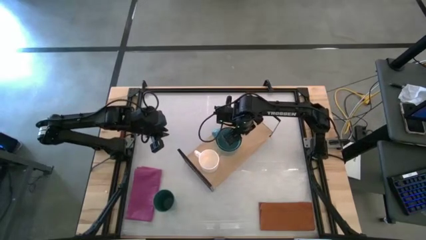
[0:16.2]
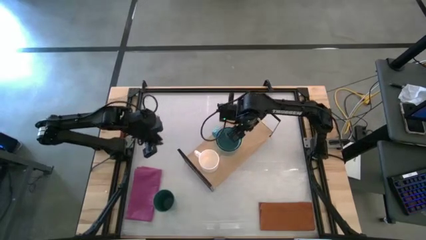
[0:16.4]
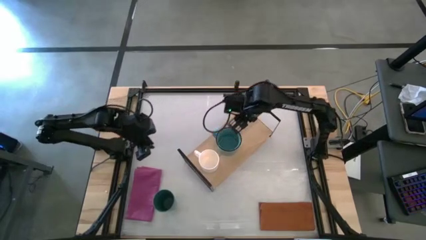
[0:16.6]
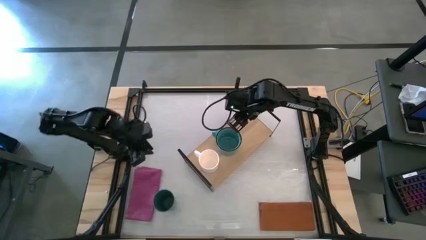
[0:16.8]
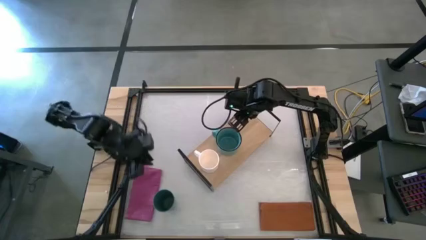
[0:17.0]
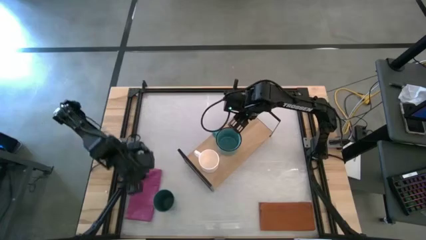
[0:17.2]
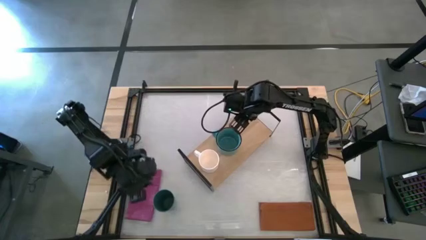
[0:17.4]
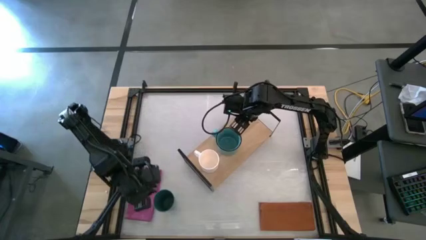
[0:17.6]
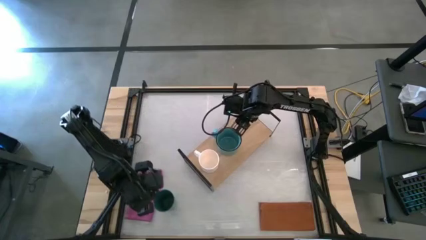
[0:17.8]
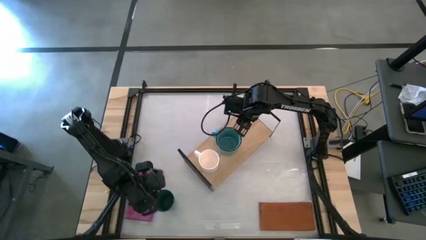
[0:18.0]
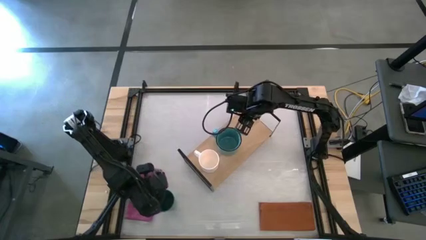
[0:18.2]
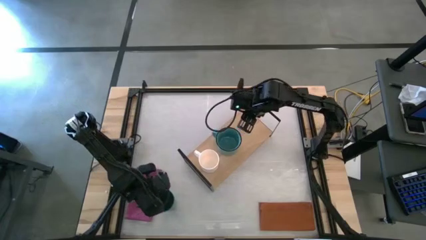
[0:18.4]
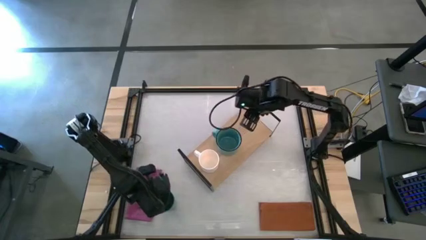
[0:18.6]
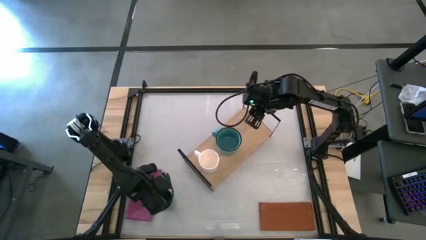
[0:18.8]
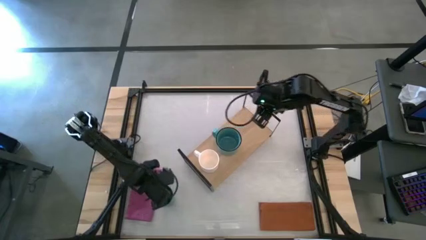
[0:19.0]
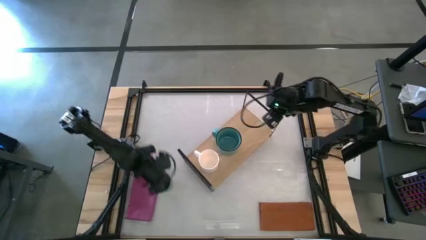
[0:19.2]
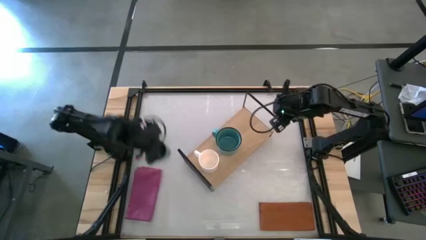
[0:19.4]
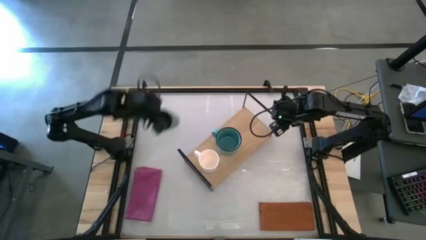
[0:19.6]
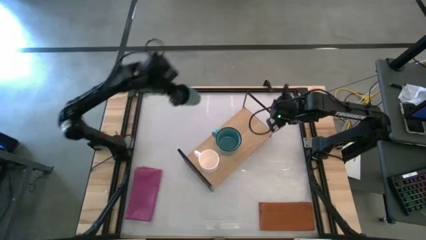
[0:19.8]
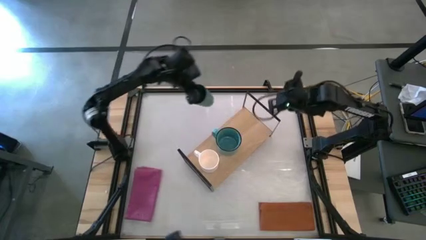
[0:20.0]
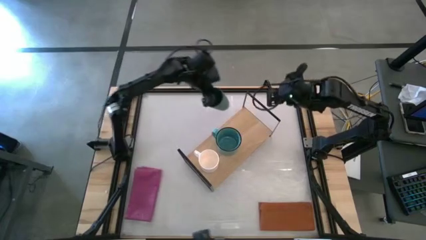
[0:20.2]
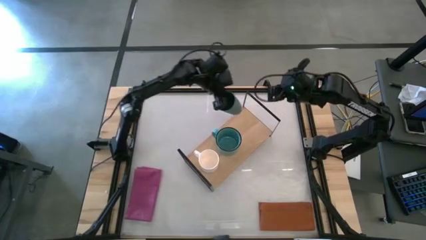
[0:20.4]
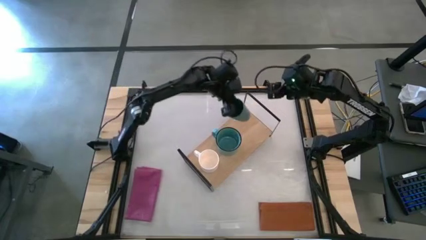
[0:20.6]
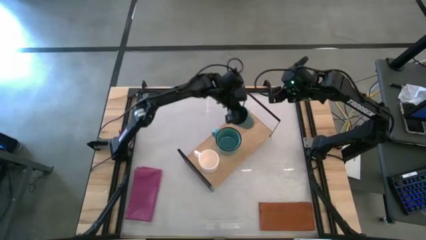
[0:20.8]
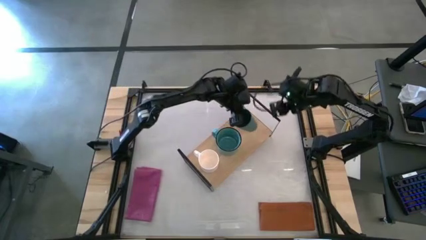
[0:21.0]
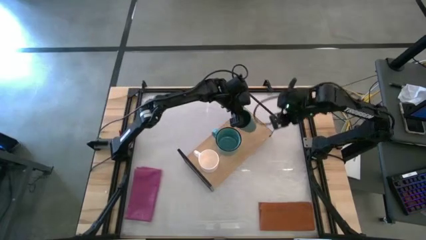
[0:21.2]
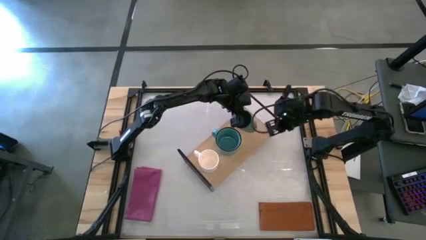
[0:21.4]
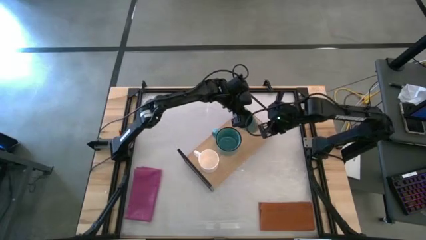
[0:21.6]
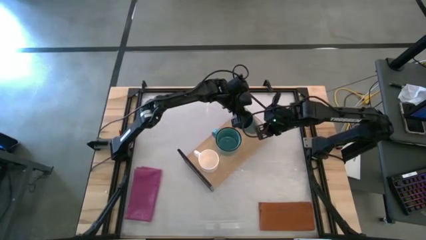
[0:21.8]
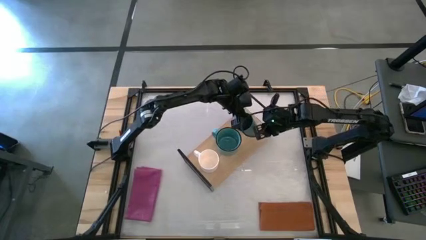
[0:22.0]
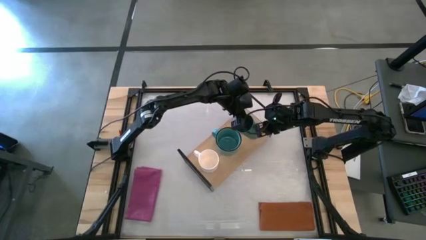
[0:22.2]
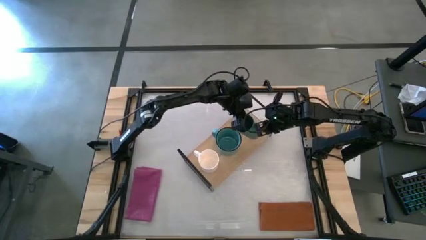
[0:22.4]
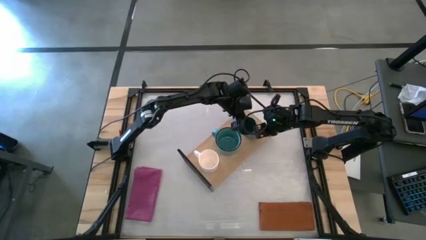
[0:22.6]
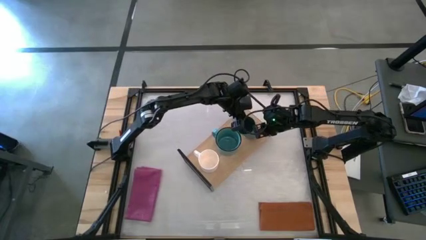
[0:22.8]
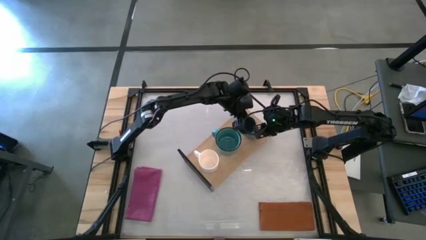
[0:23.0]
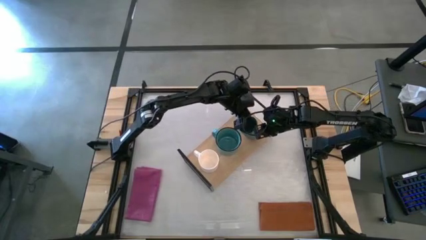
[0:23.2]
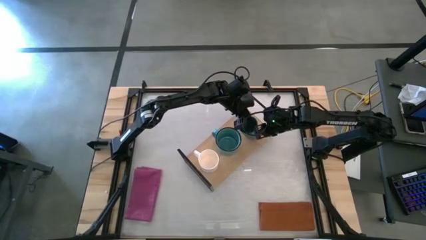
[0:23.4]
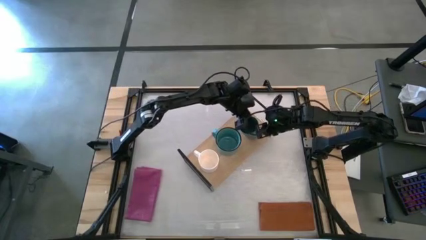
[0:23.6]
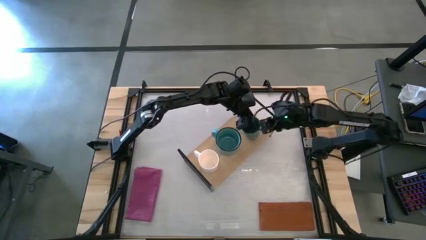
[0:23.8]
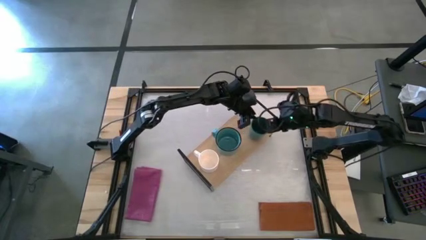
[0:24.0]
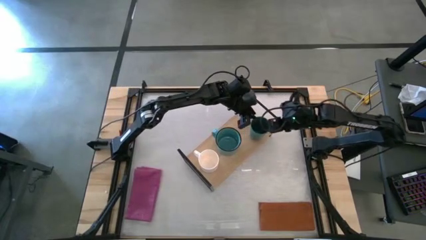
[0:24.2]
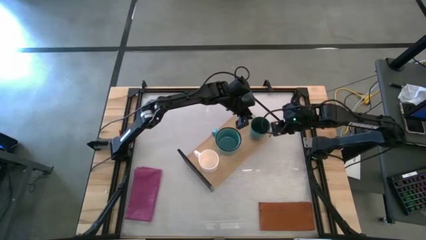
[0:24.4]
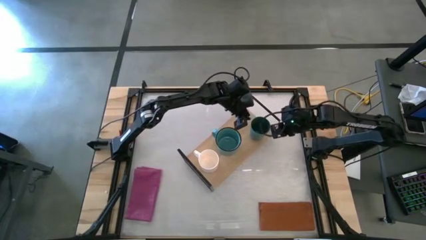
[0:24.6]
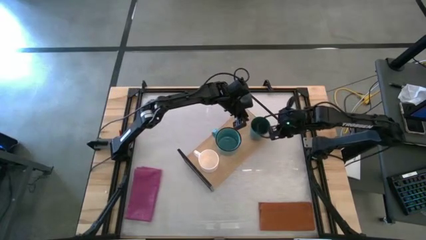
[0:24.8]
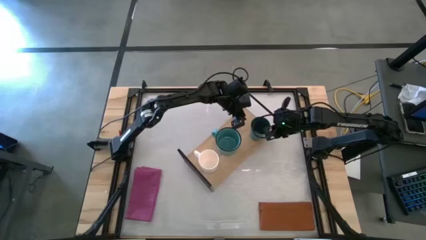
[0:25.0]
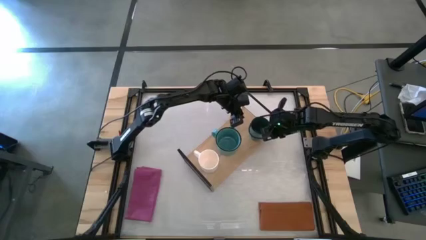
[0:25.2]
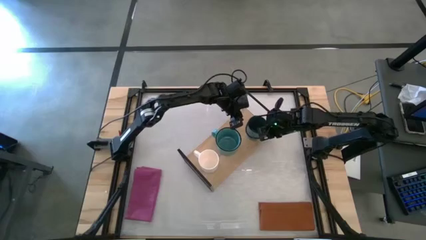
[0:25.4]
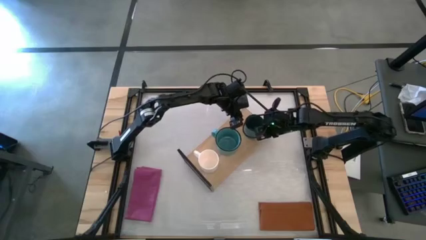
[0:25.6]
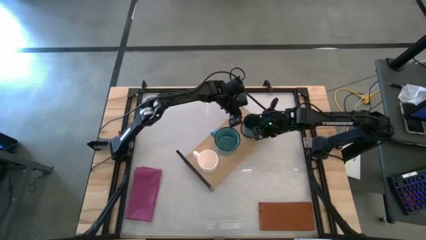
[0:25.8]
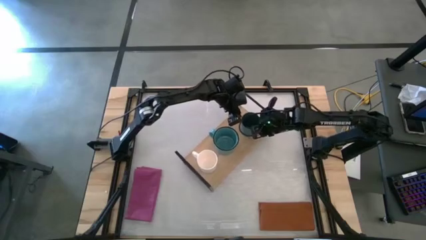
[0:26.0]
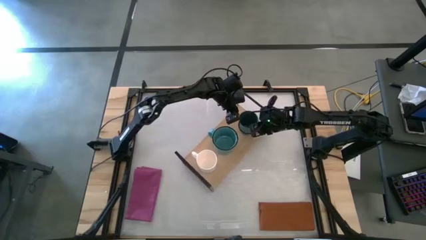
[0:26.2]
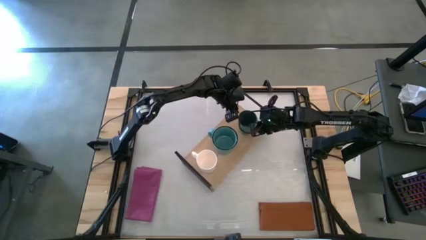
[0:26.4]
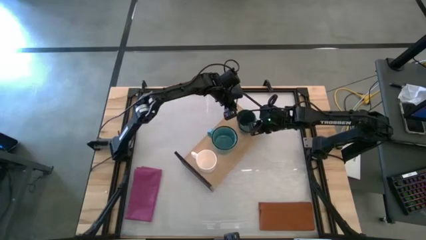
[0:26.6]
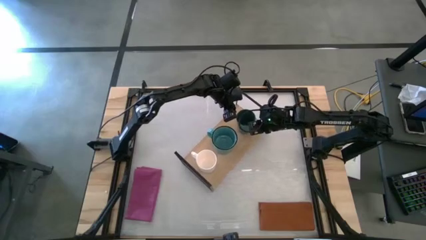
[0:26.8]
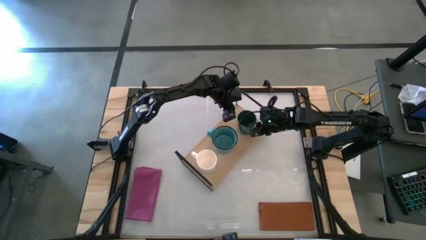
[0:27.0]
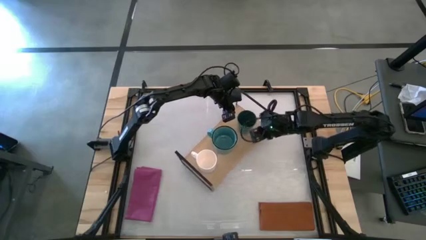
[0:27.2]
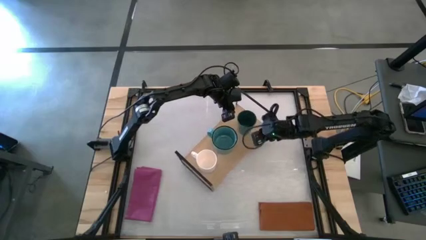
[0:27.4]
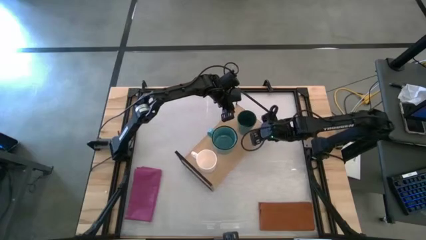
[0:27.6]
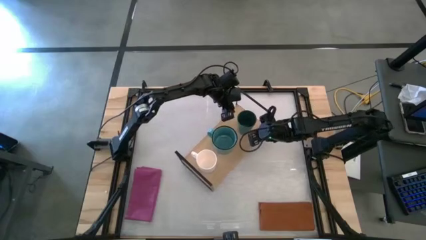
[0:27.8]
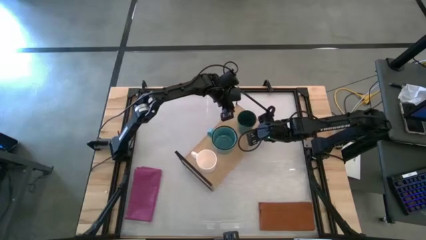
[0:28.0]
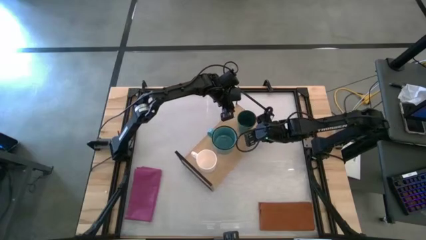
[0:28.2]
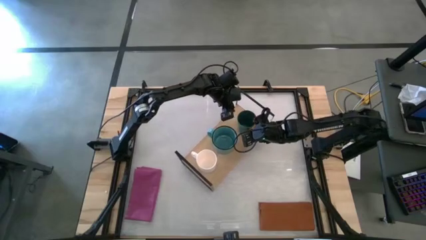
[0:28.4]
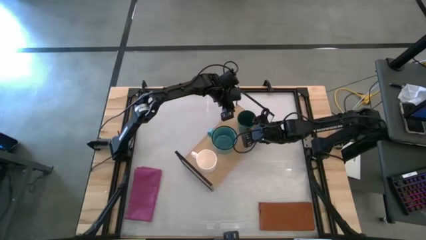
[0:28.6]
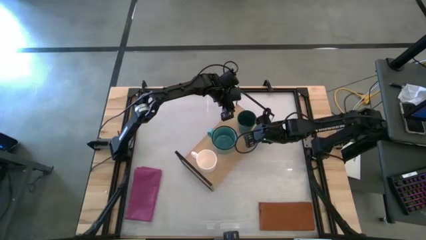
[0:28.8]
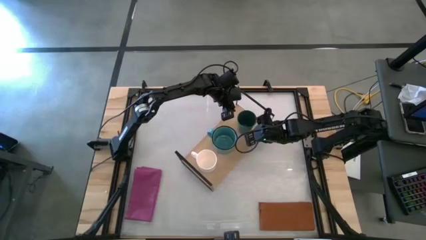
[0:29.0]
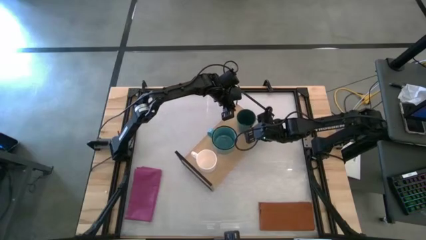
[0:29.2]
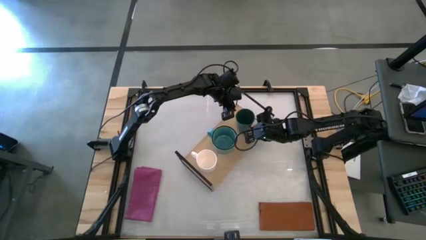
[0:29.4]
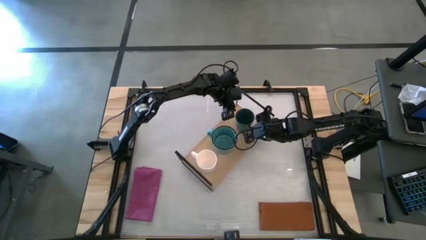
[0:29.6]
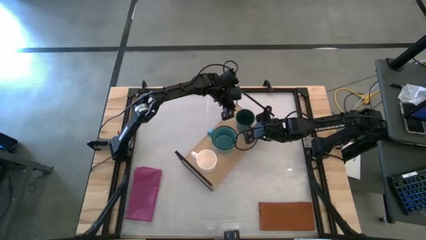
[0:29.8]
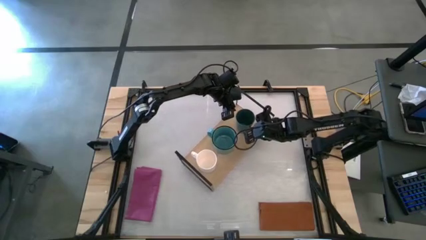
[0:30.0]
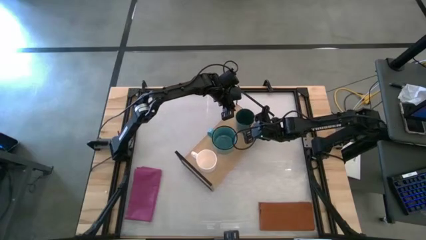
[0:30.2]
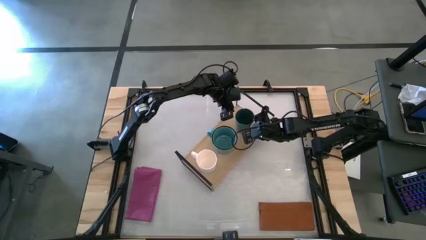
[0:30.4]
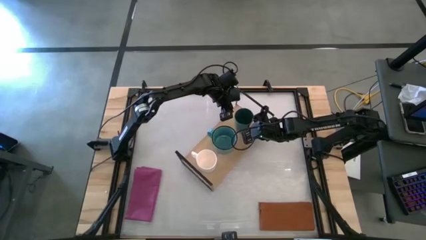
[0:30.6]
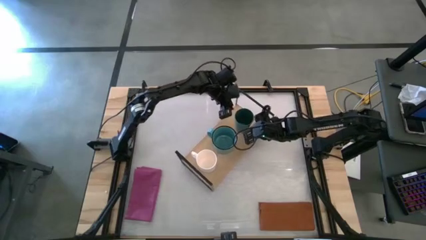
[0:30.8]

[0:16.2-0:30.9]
Task: Stack small to large cups/mugs on shelf
Put the green cup on the shelf

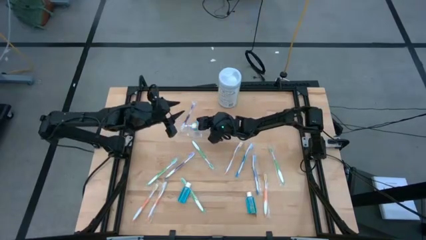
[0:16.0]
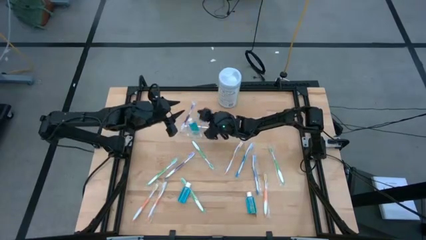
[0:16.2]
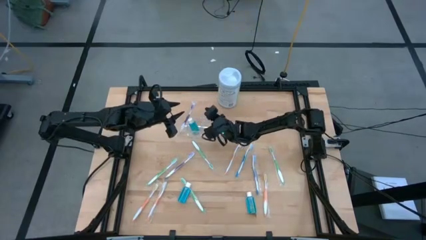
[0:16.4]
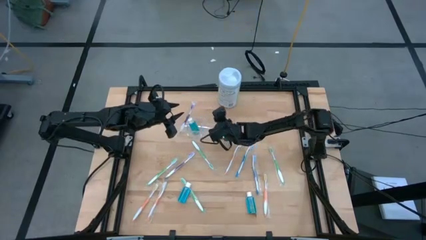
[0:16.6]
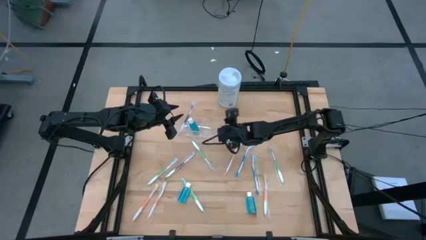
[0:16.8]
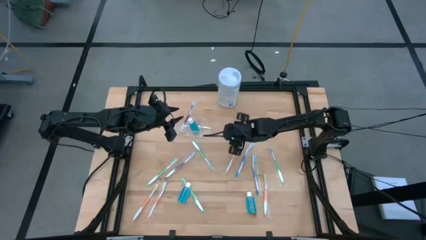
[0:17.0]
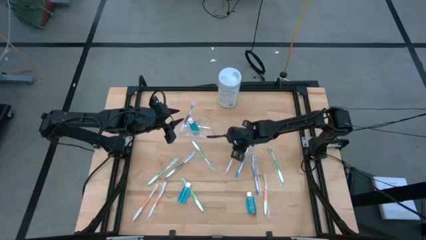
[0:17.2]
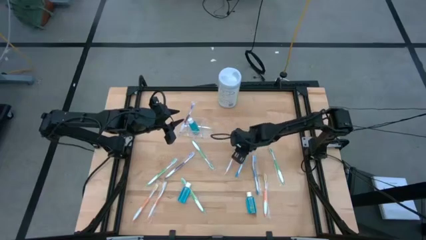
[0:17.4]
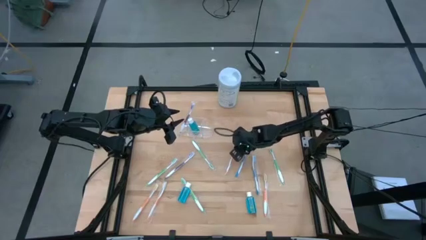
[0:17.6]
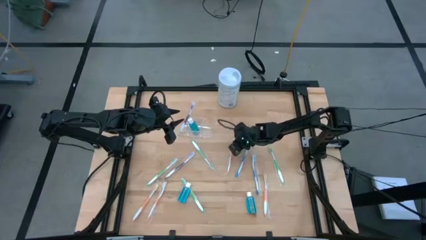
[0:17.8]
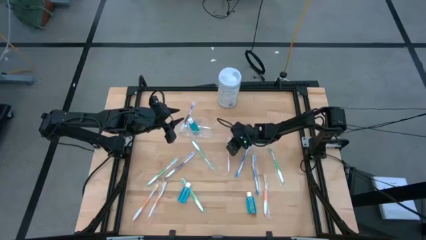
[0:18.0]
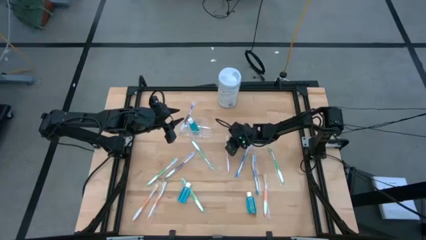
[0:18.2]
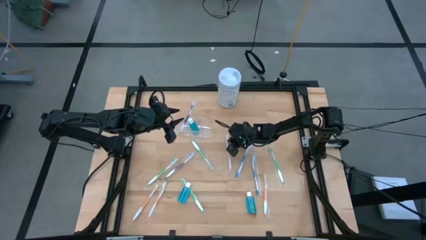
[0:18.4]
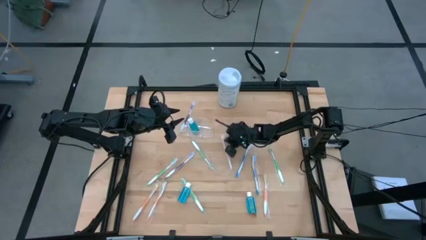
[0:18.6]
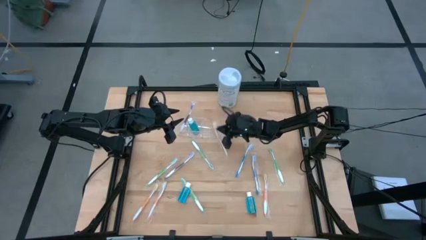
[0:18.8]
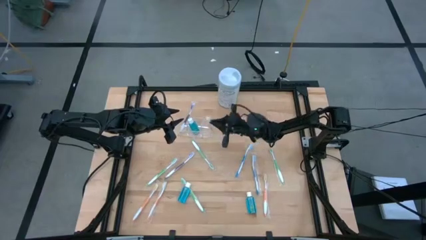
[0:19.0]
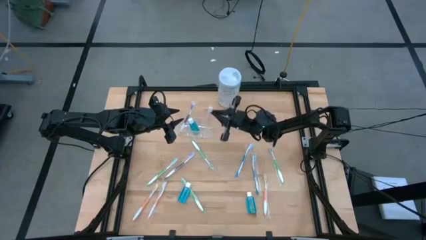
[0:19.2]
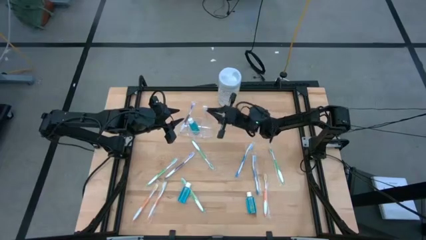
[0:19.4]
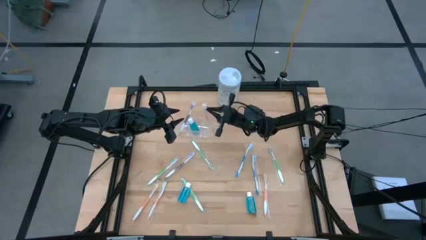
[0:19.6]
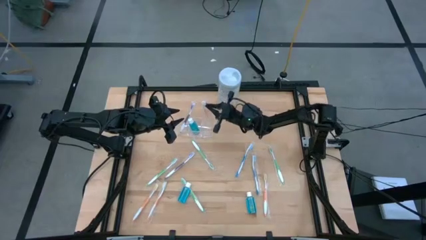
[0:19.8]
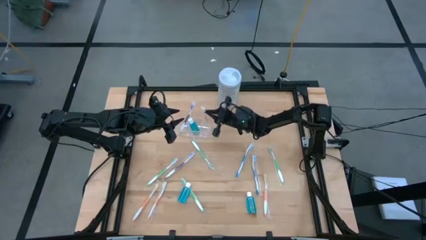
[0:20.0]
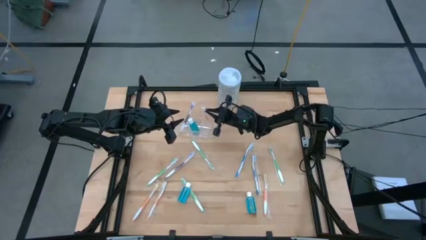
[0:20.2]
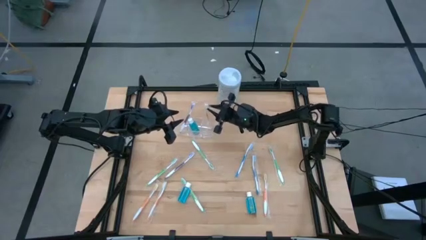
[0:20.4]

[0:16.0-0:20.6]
Task: Pick & Place toothbrushing station
Put the orange toothbrush into the transparent organizer
